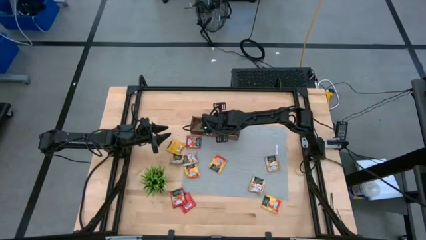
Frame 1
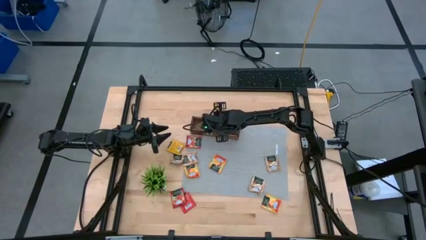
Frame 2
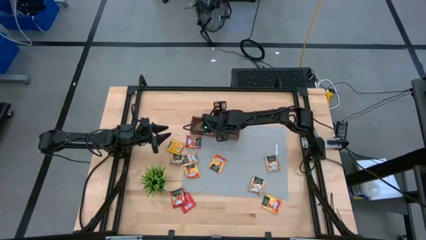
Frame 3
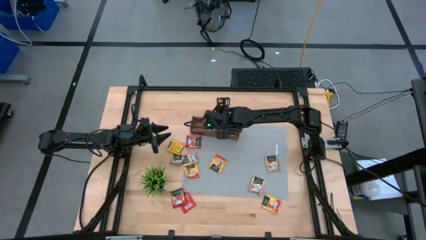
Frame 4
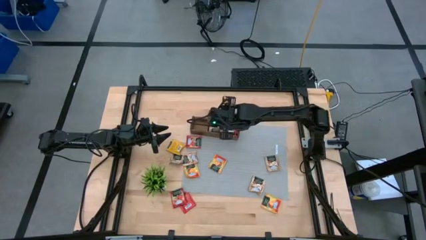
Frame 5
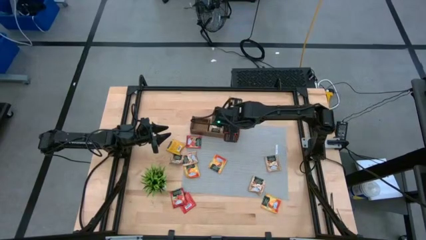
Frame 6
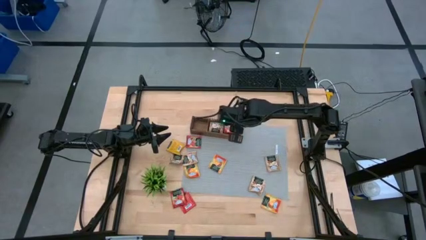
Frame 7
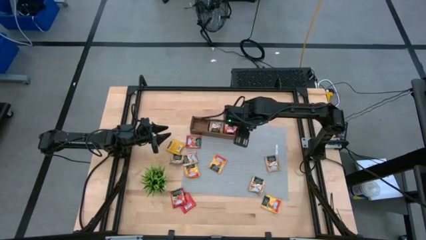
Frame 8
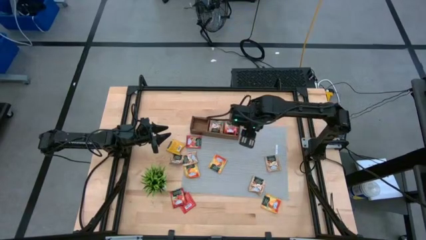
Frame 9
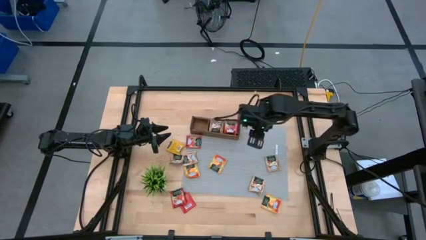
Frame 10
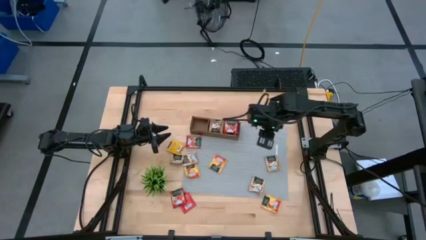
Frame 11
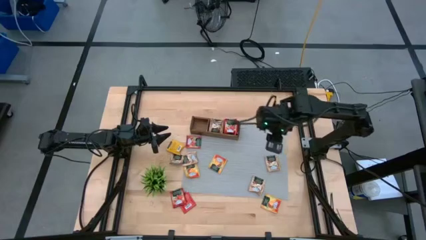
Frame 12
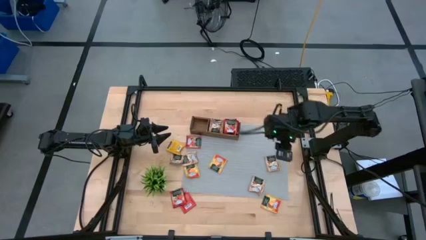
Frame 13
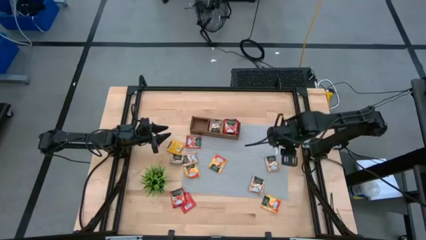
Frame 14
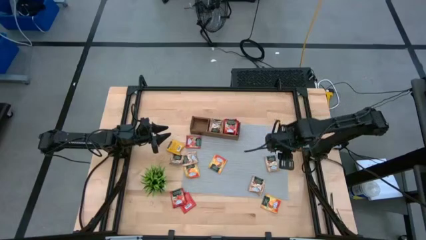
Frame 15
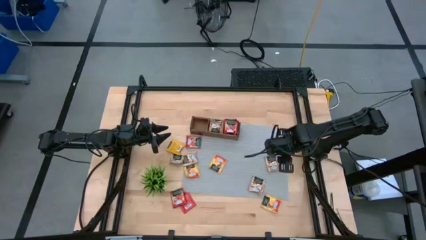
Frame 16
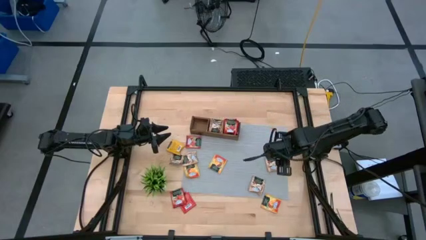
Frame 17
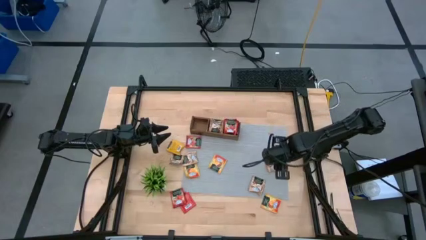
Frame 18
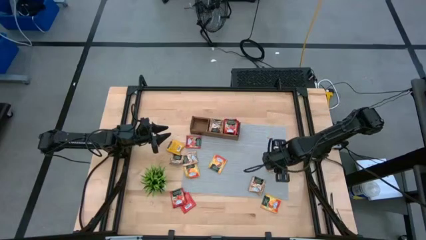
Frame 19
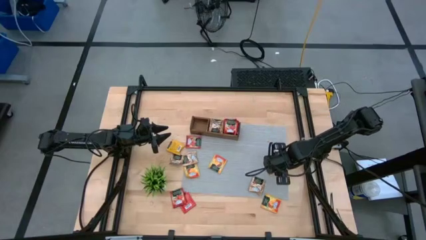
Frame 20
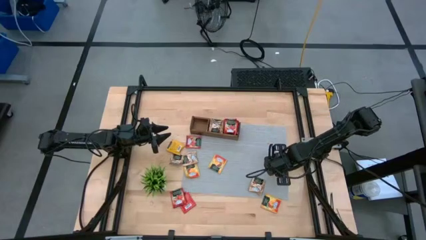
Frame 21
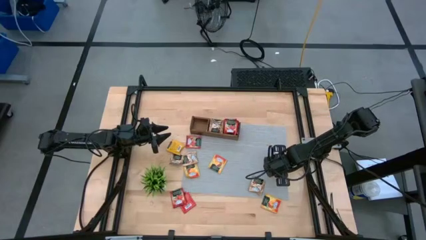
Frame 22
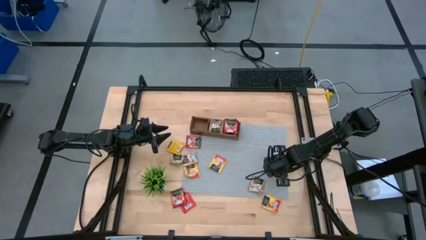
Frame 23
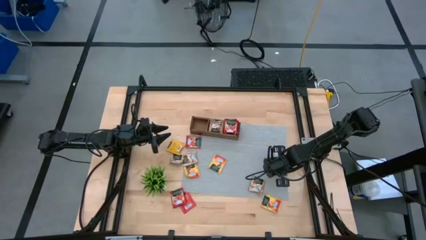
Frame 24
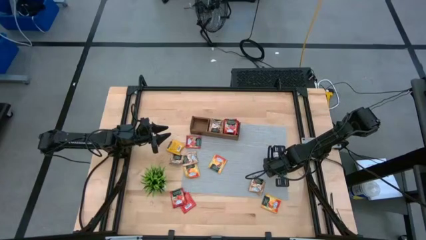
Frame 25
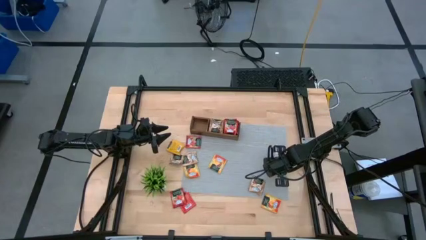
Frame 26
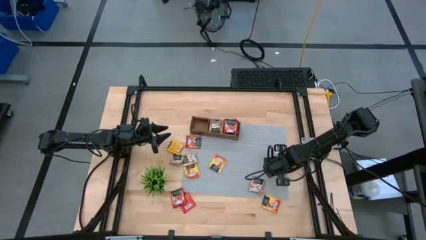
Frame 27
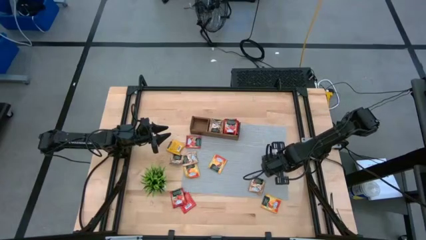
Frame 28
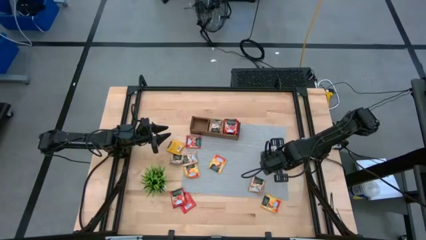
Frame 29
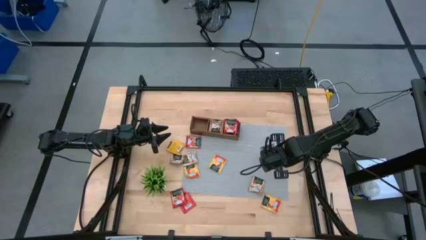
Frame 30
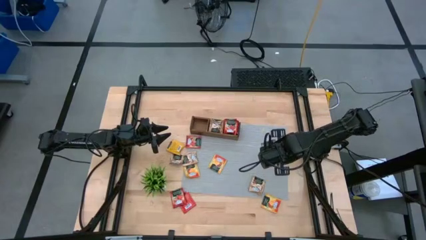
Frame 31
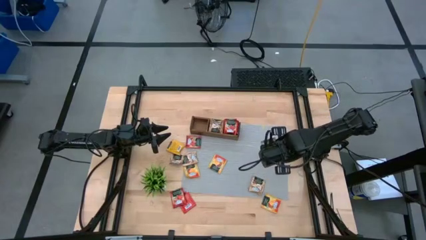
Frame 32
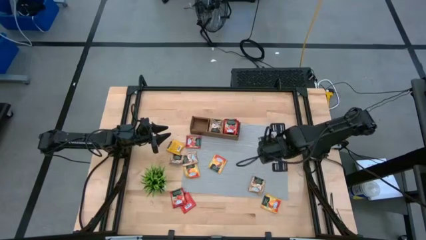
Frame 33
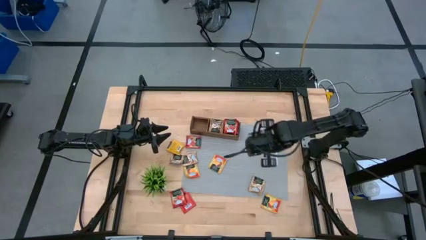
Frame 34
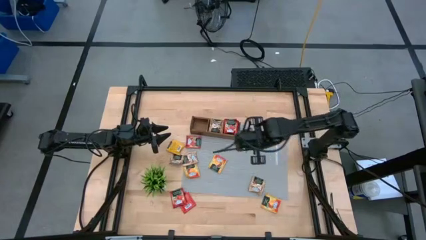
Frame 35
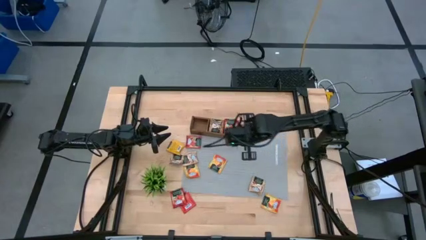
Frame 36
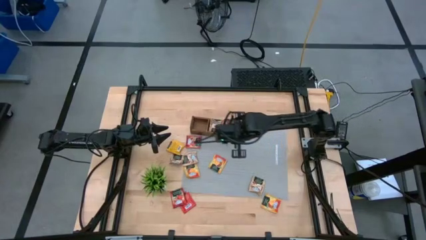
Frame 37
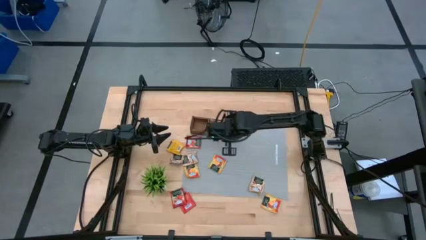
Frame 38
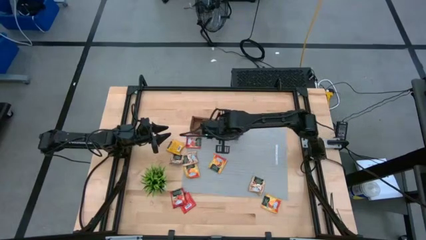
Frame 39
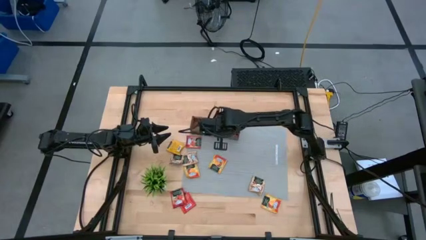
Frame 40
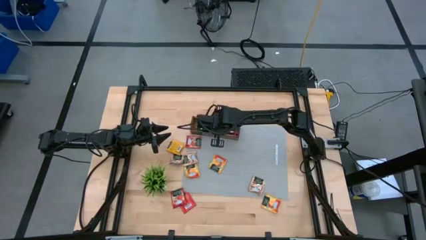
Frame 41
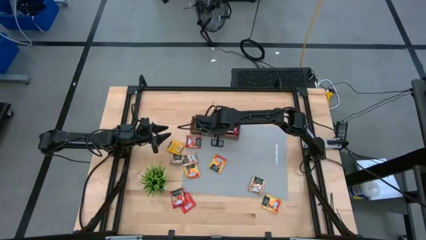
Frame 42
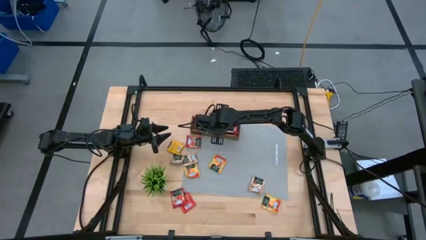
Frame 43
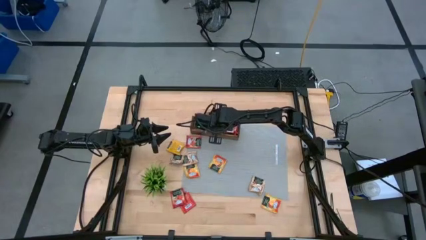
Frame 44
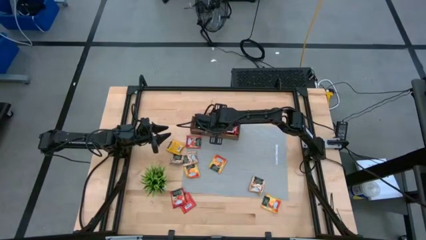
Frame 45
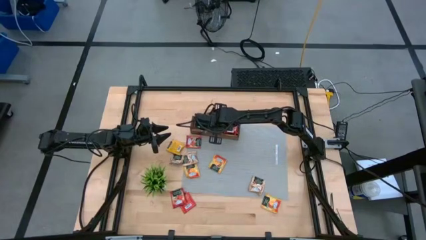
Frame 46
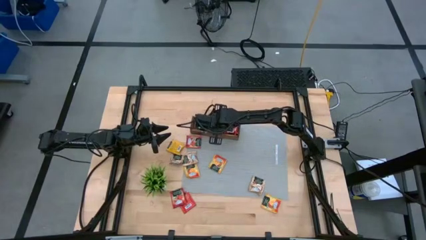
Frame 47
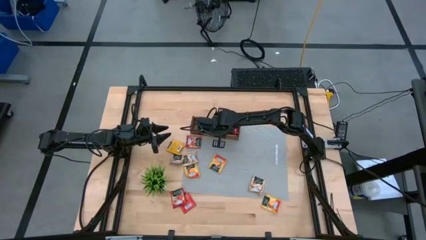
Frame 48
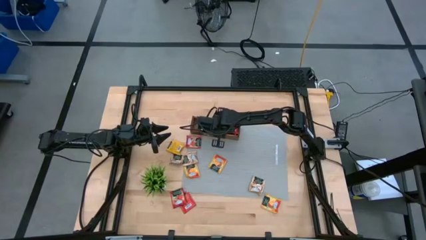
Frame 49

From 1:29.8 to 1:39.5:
Task: Pick & Place Tea
Put the gold tea bag into the middle section of the wooden organizer
